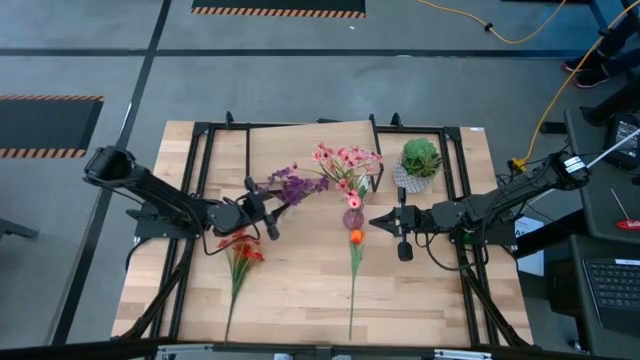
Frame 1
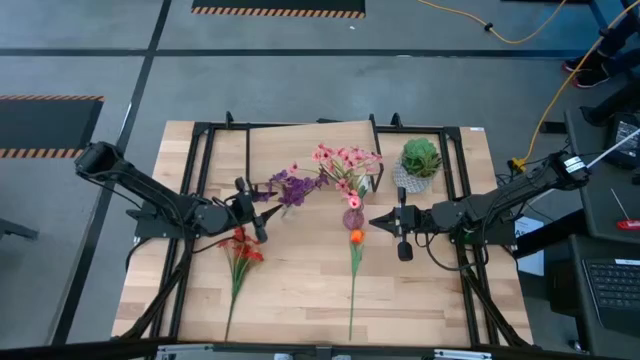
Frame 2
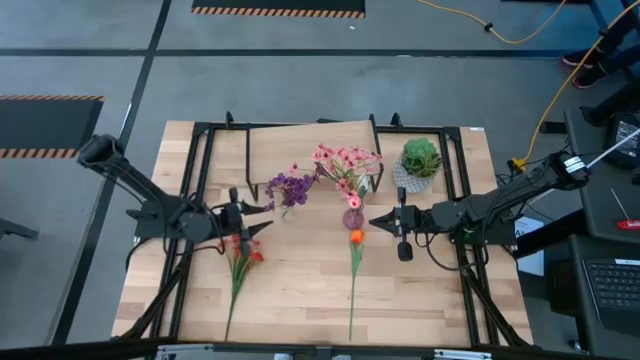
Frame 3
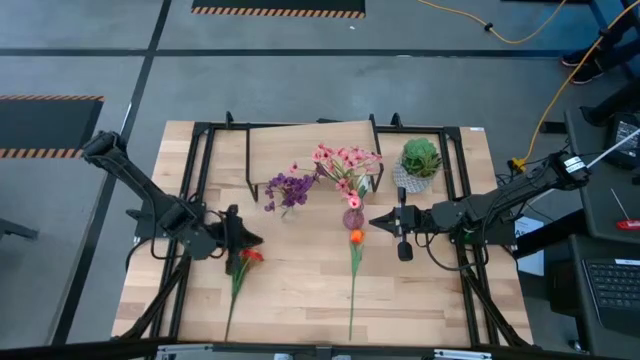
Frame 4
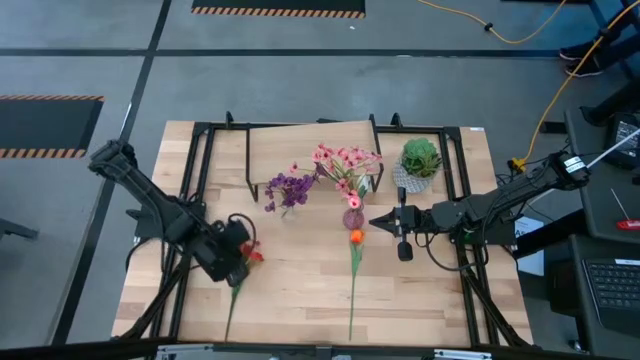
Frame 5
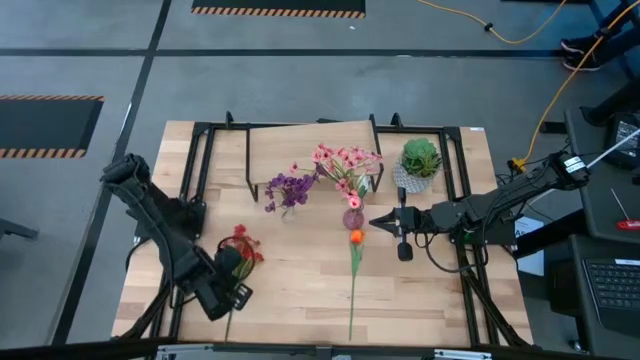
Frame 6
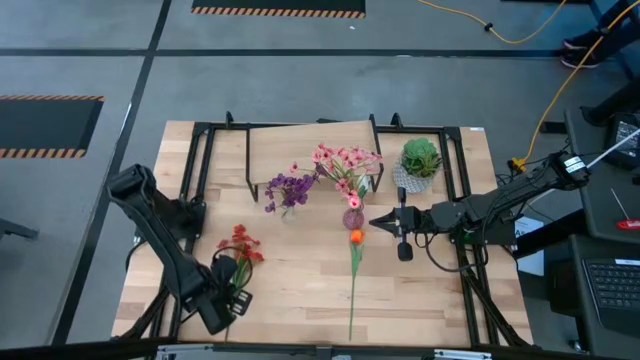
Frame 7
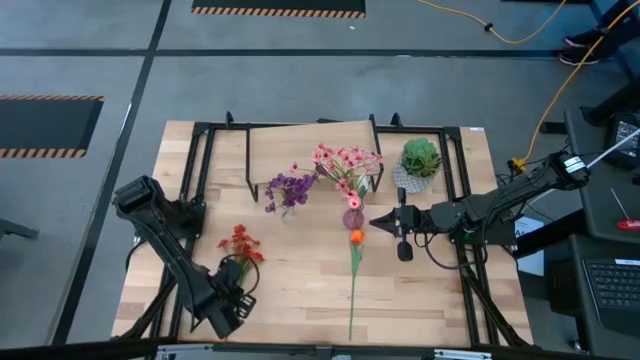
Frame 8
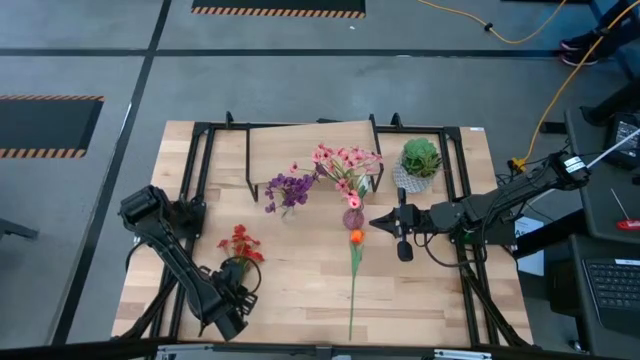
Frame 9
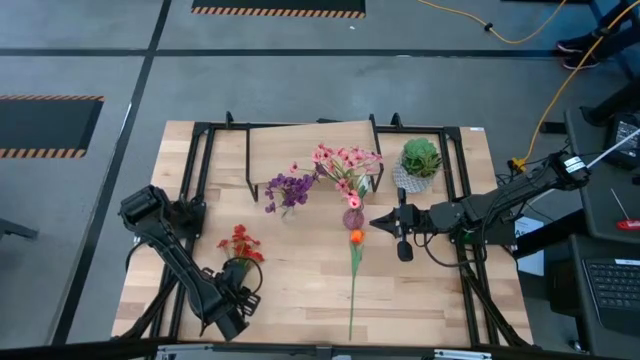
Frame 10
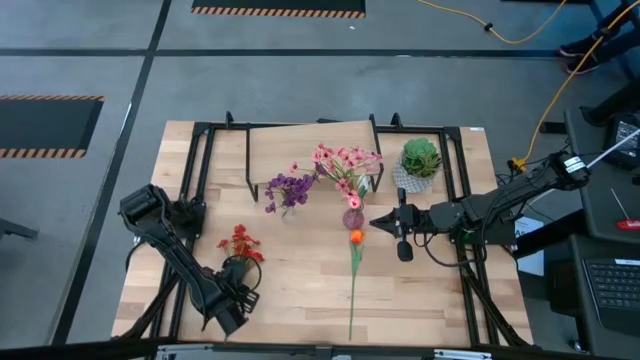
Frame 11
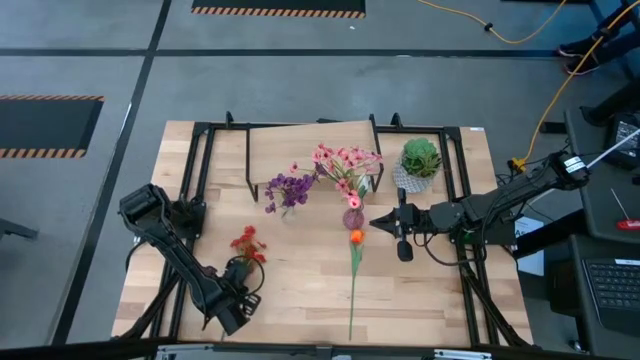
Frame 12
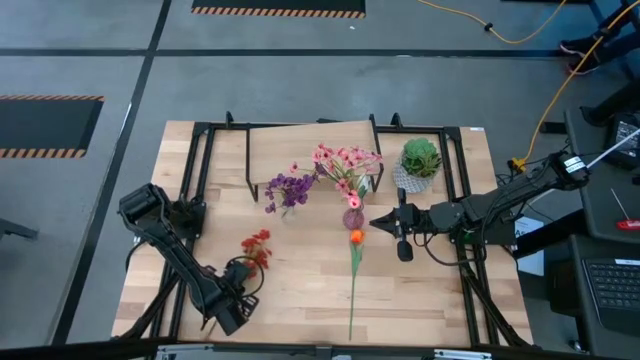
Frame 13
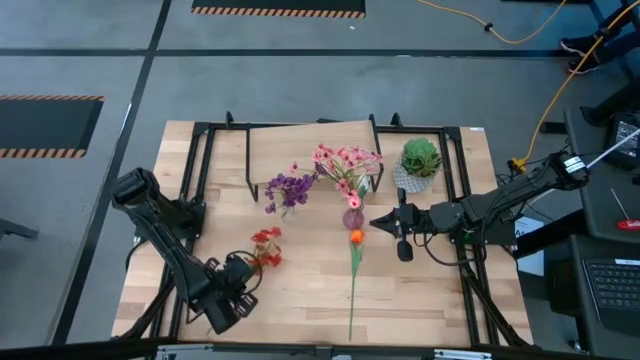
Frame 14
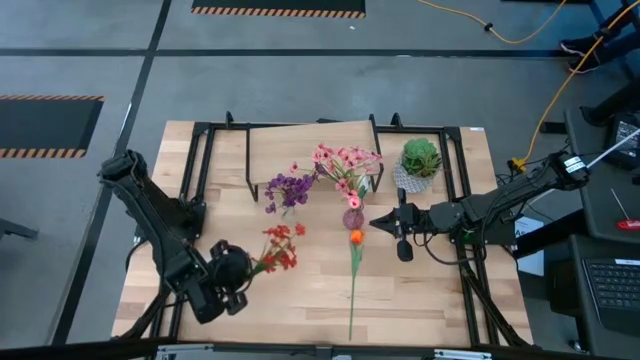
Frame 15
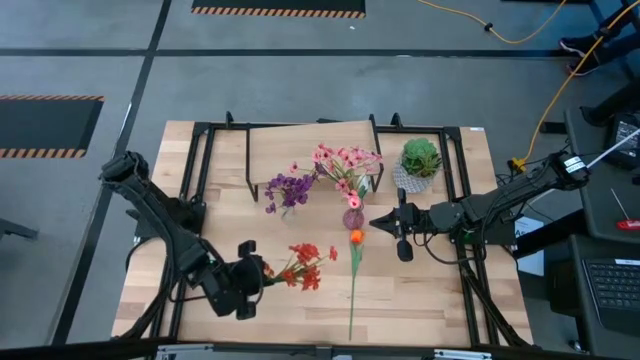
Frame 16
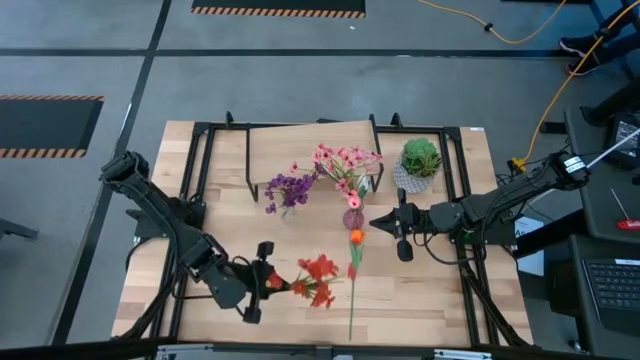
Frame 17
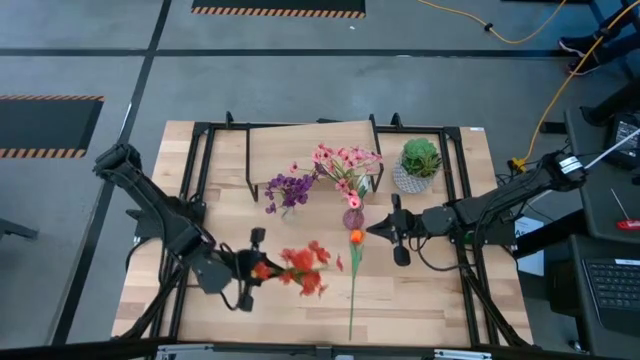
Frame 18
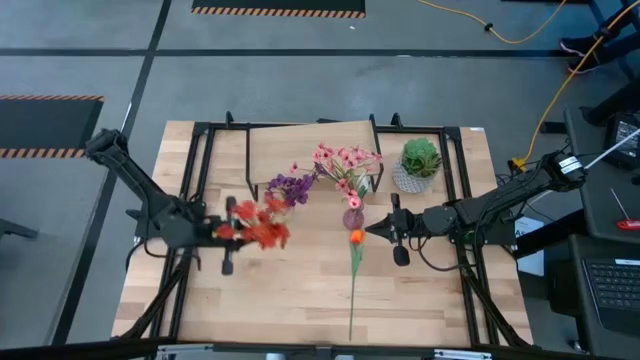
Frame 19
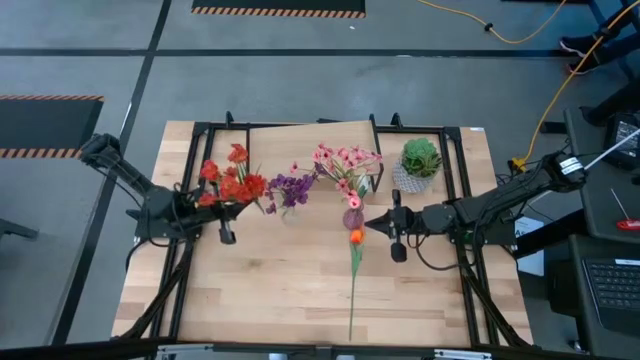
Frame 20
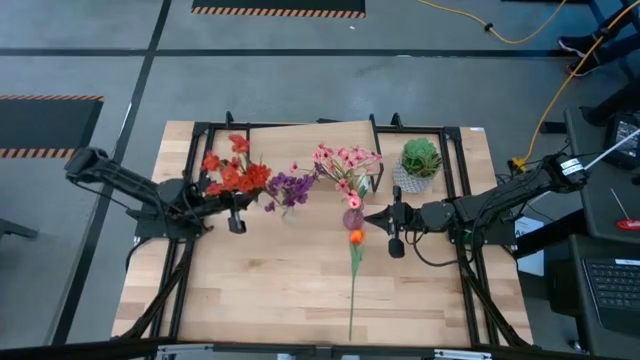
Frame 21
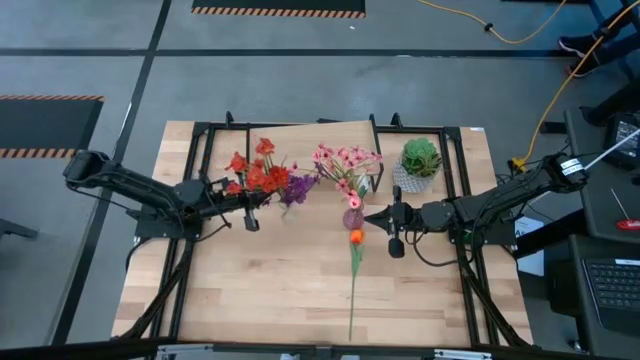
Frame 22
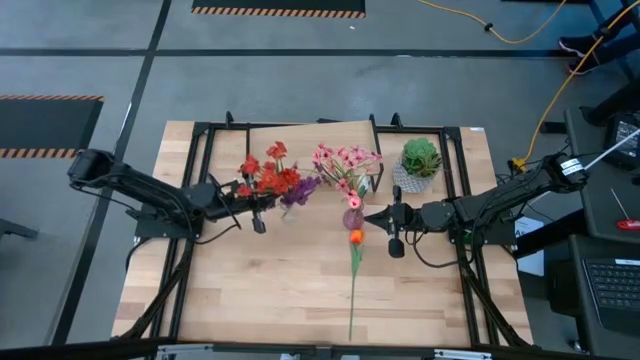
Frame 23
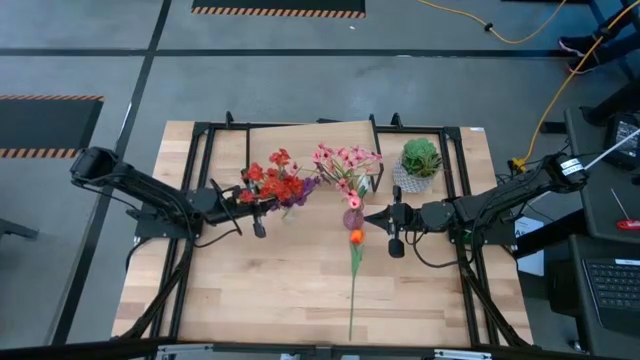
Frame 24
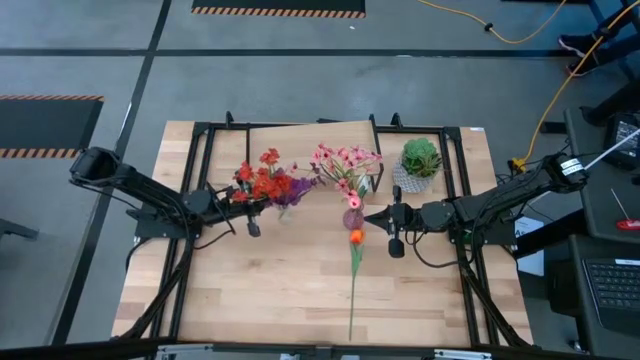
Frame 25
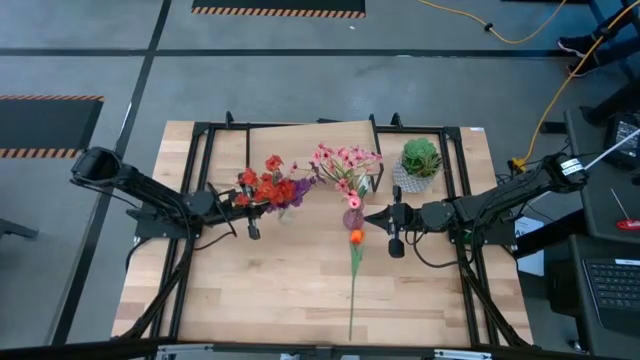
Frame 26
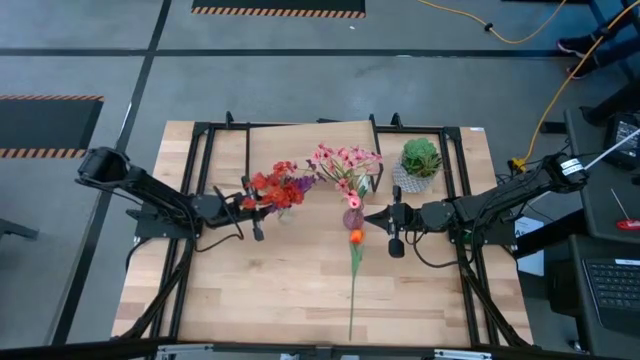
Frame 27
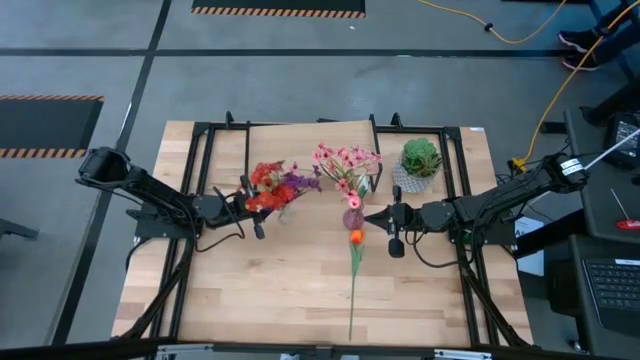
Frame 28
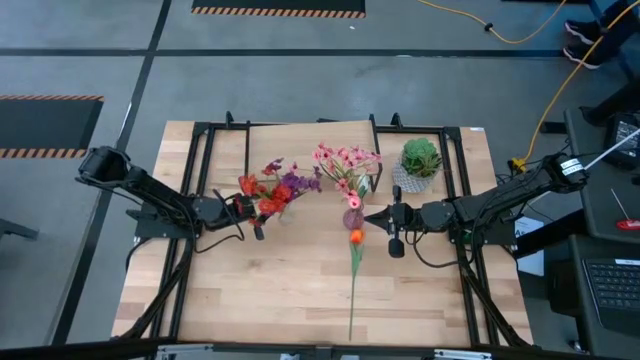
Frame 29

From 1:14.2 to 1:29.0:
Task: Pick and place flowers into a vace then onto a shelf
Put the red flowers into the transparent vase
